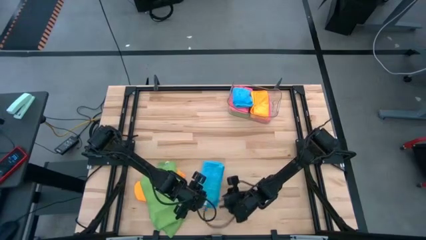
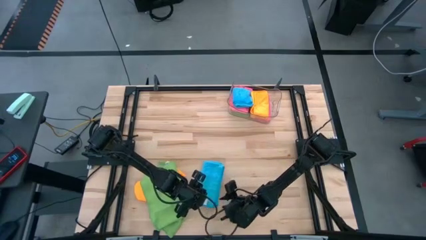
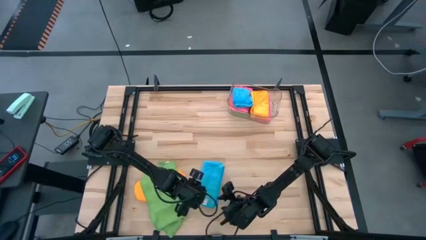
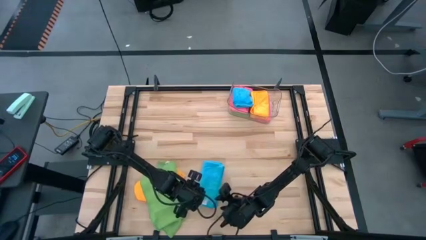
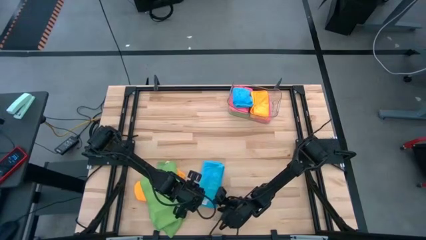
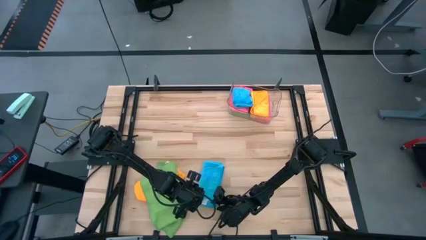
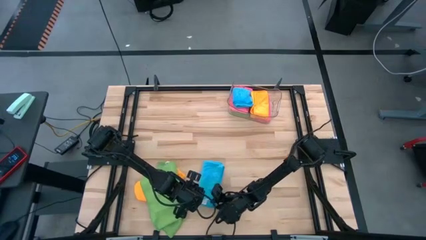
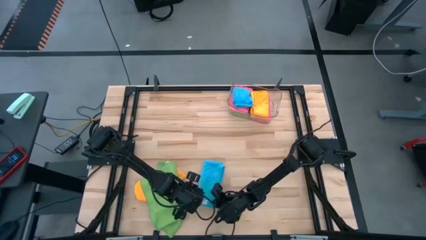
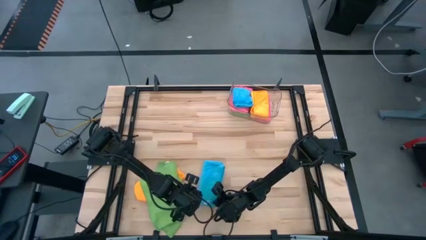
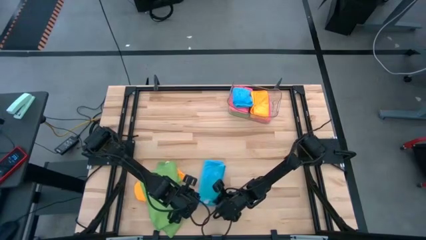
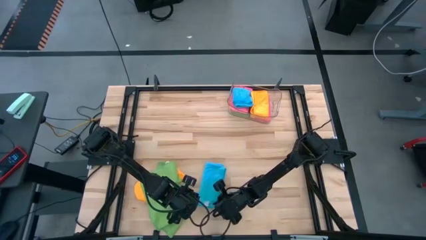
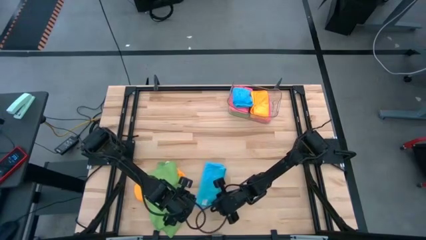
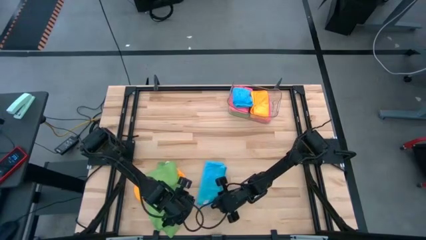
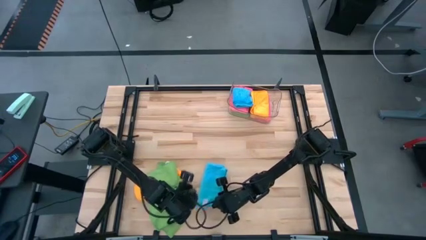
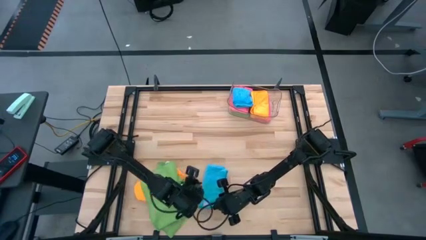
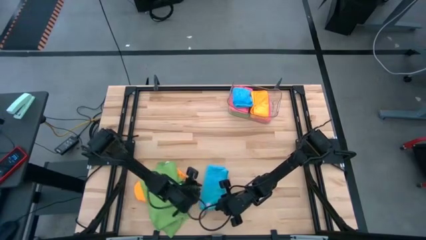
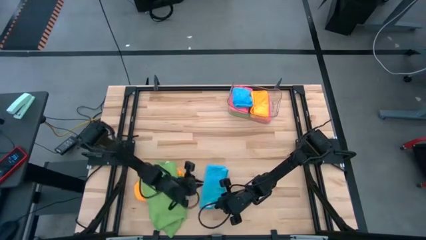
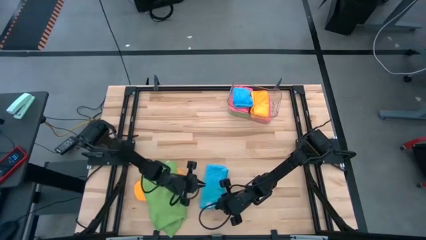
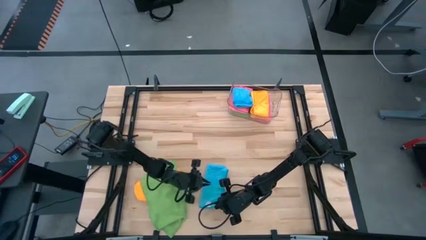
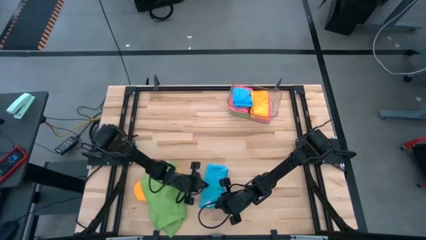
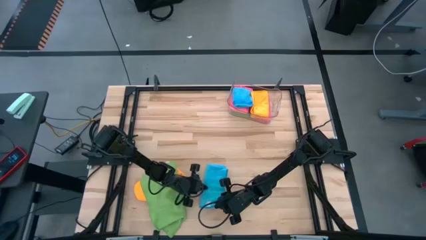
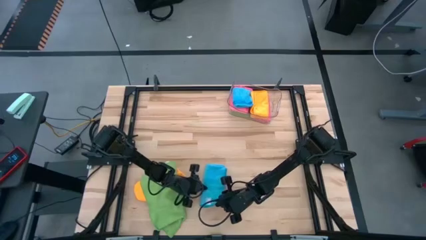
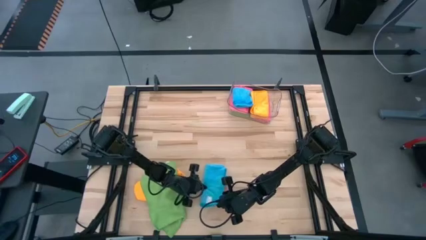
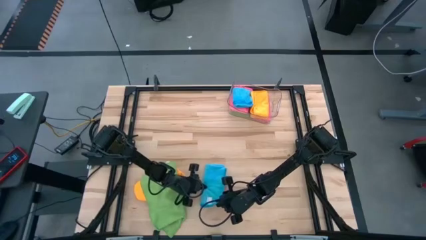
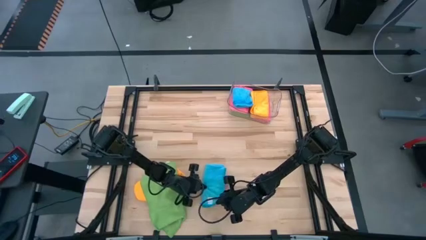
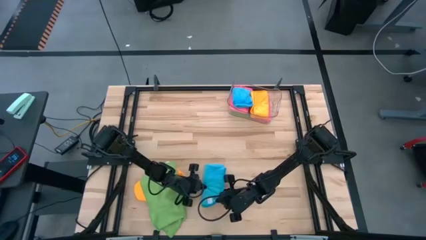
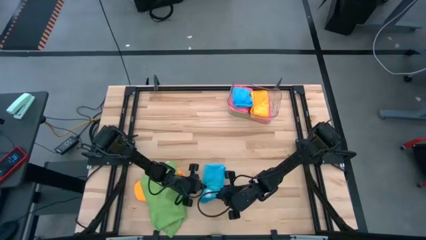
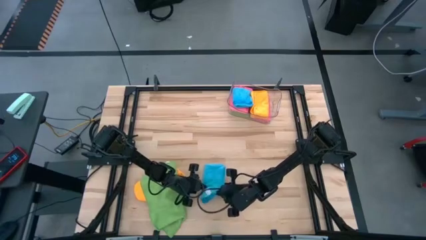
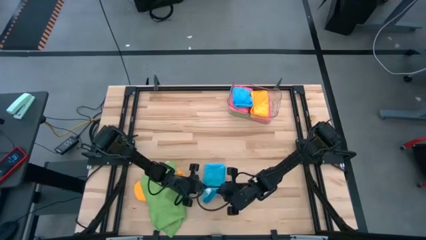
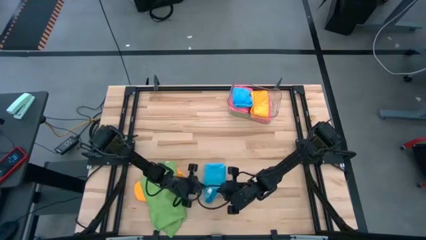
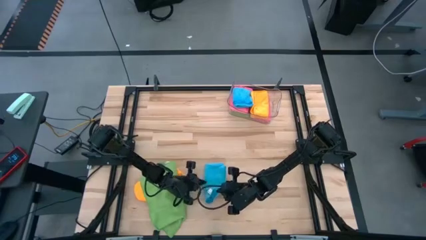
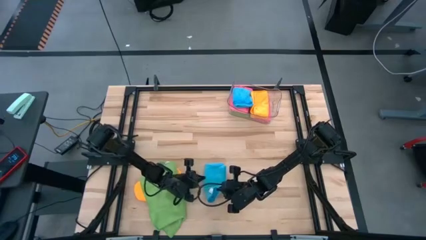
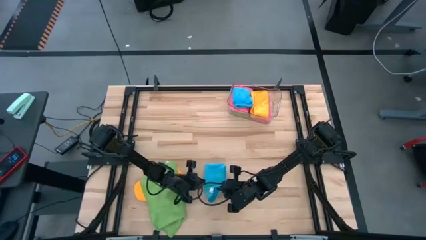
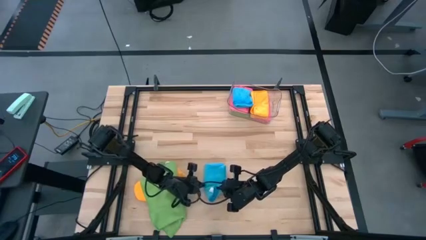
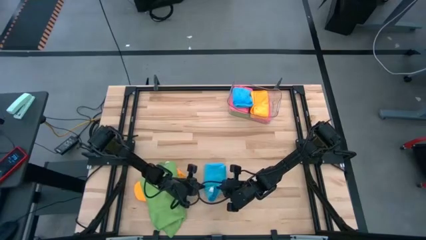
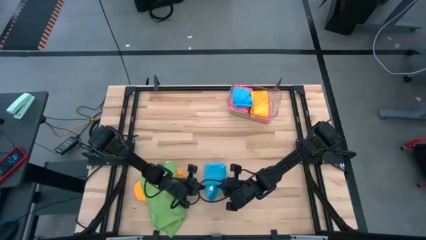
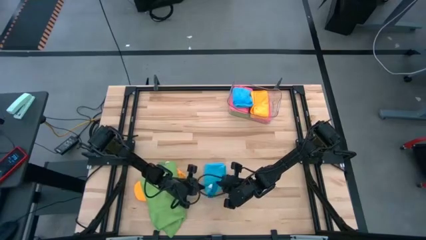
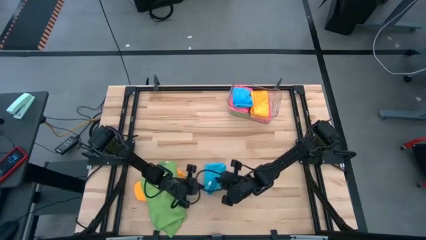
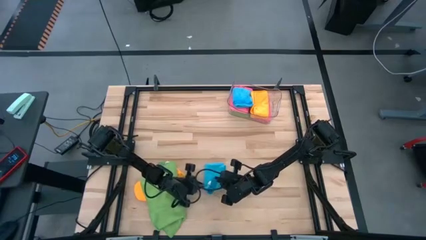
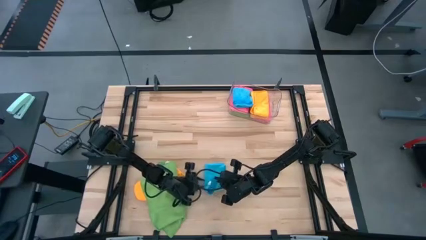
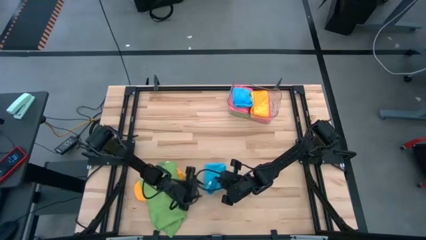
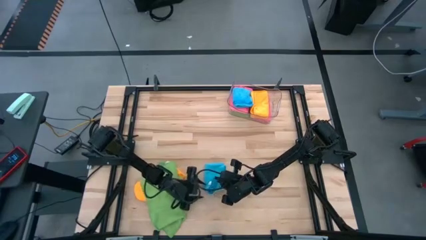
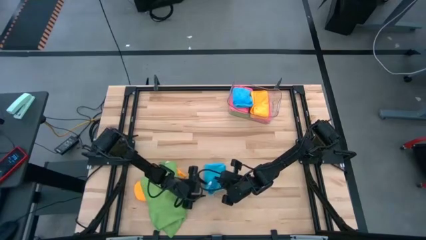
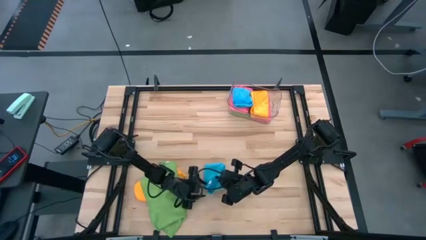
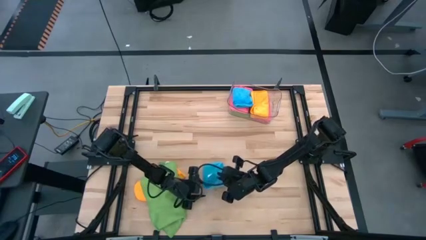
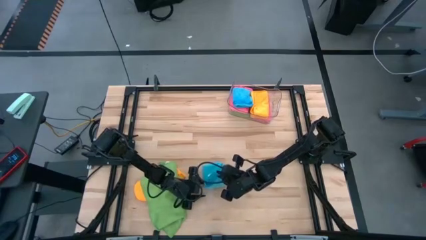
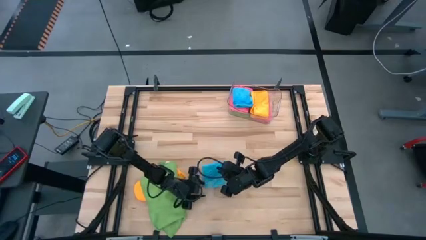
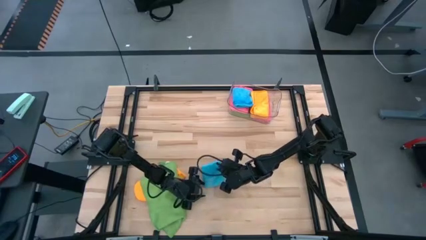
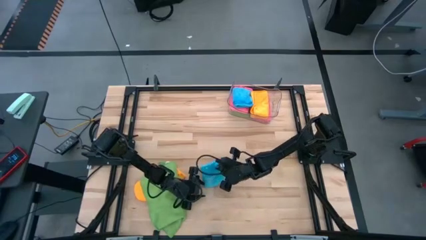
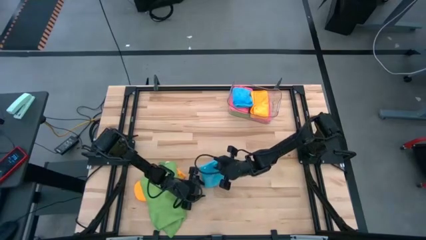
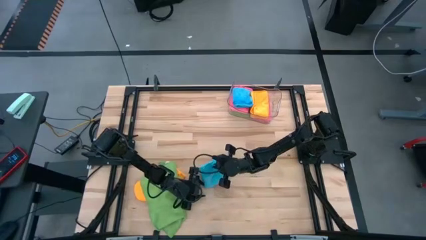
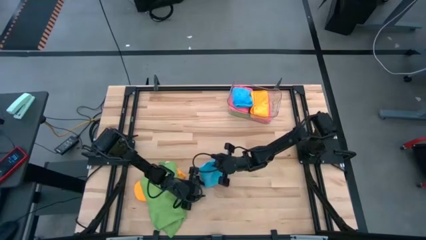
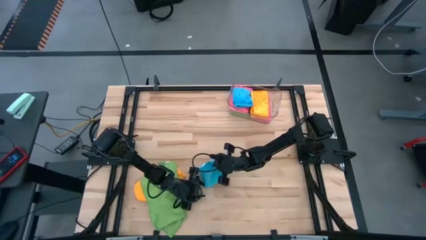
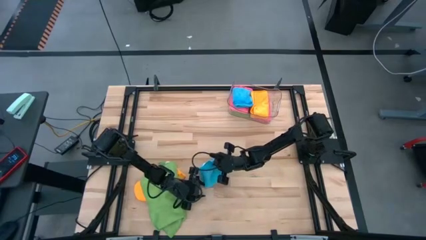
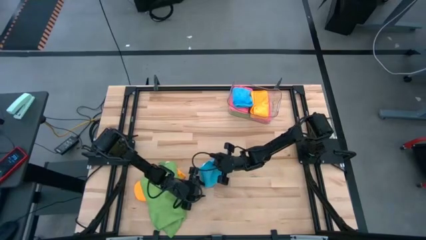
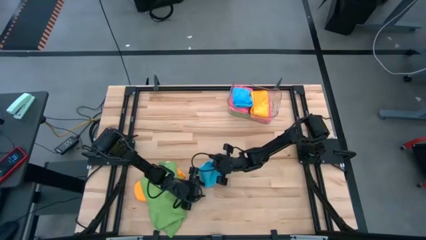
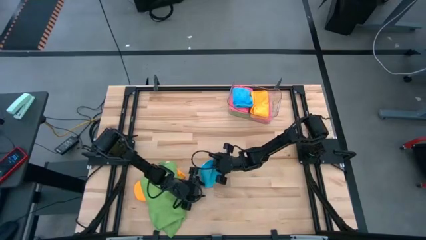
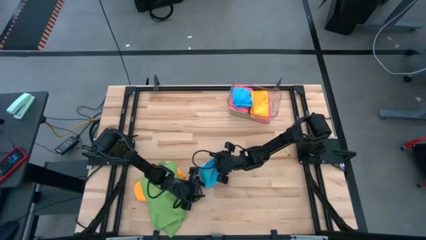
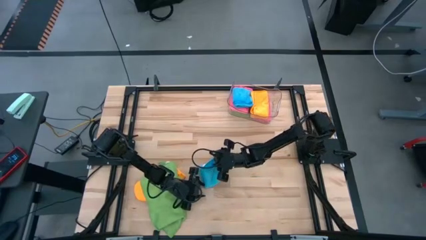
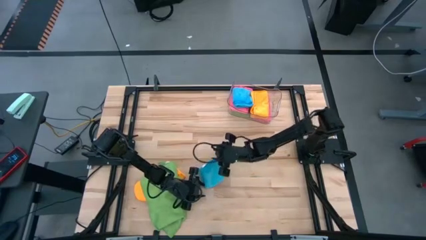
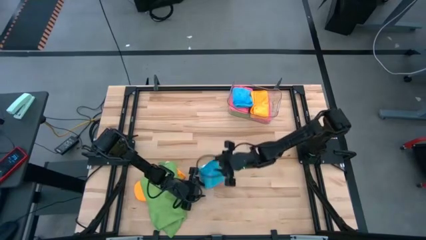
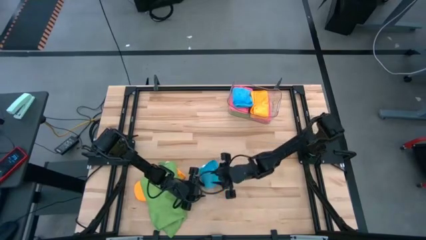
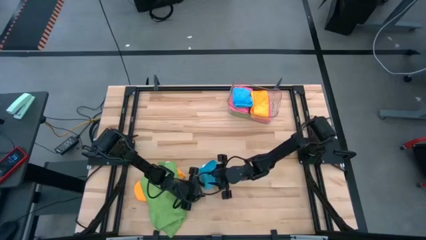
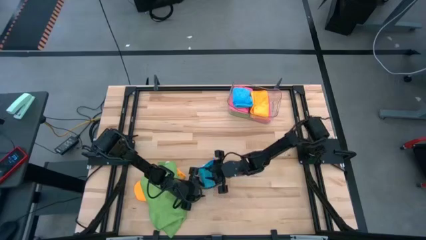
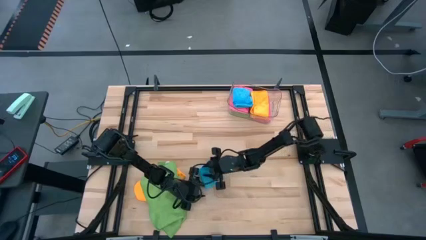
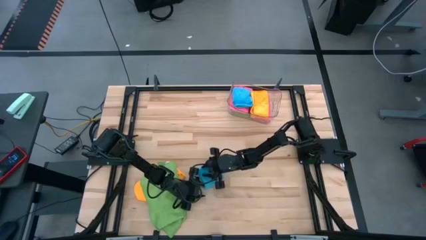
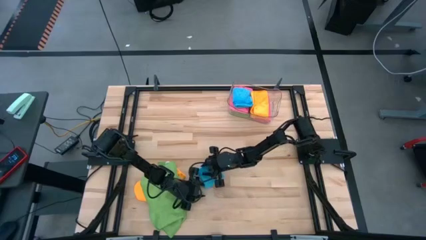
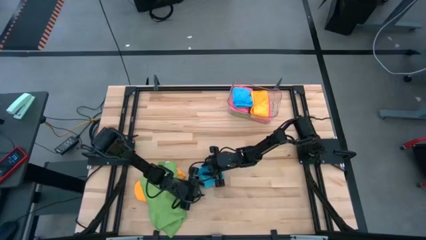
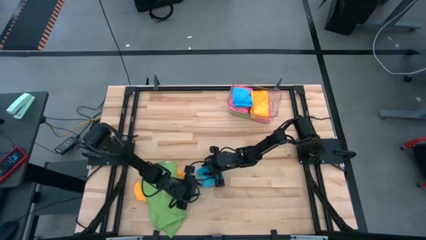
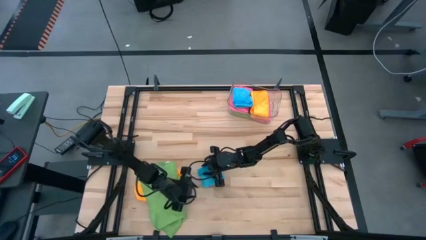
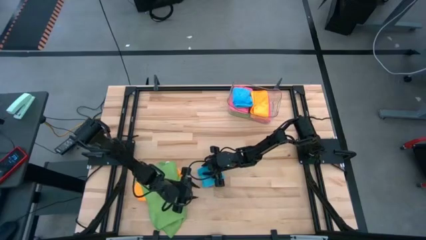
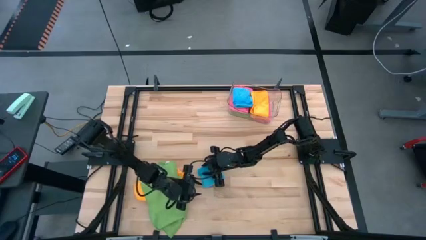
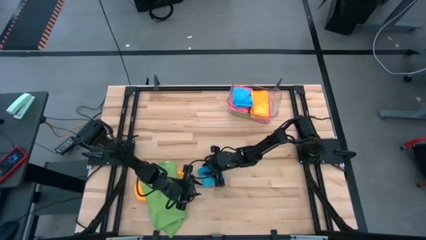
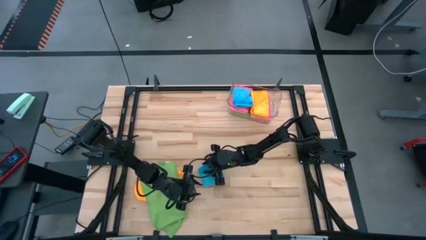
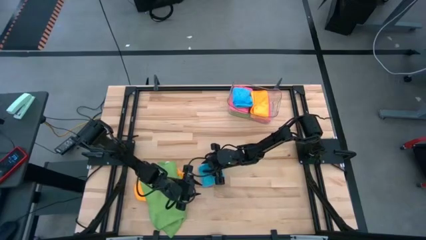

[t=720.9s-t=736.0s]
Task: Fold microfiber towels
Fold the blue towel
